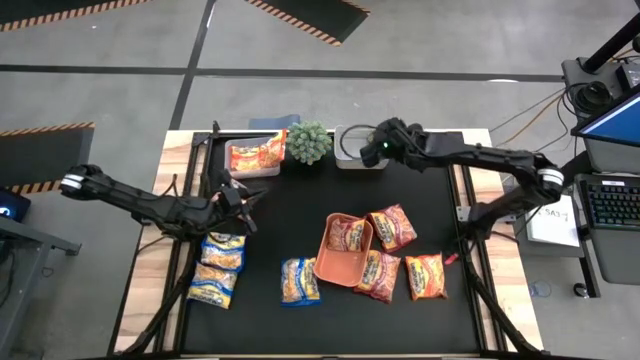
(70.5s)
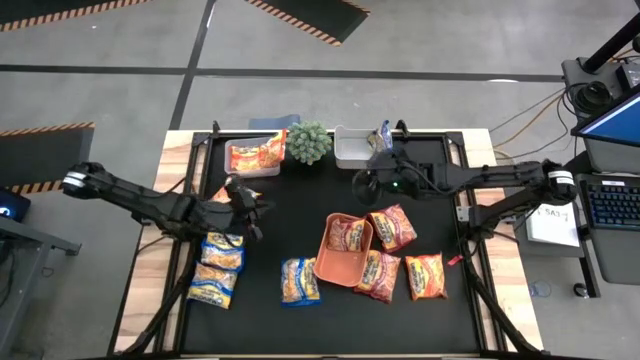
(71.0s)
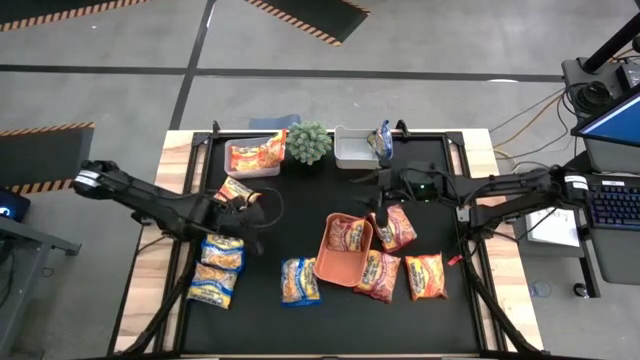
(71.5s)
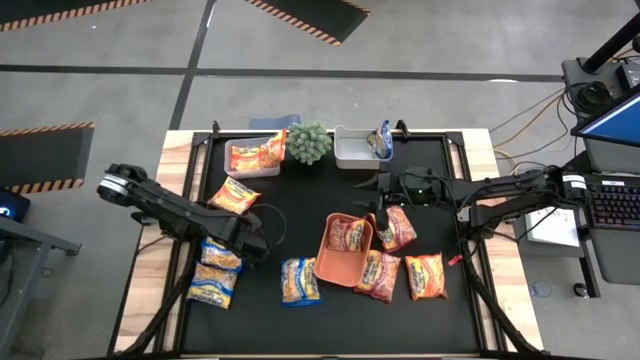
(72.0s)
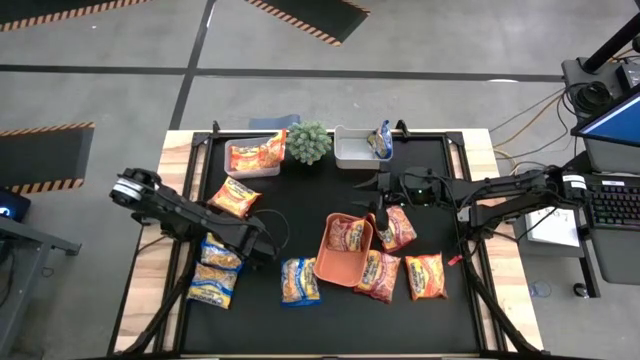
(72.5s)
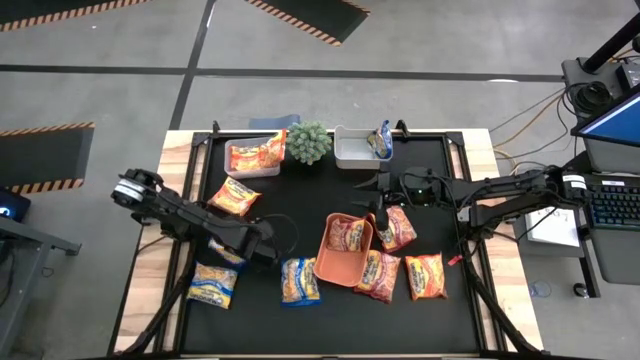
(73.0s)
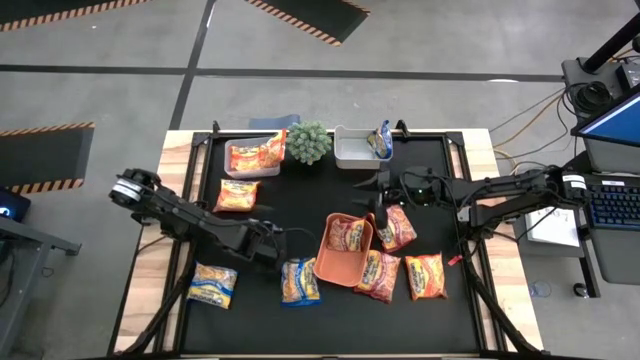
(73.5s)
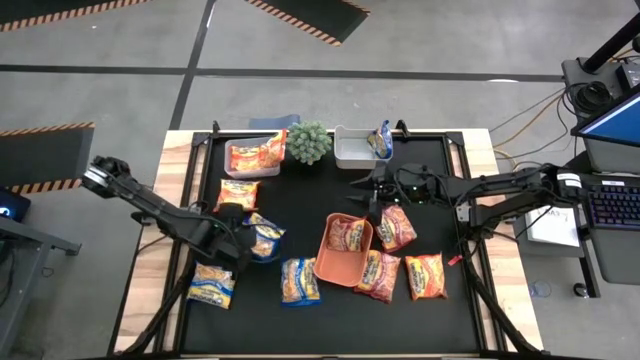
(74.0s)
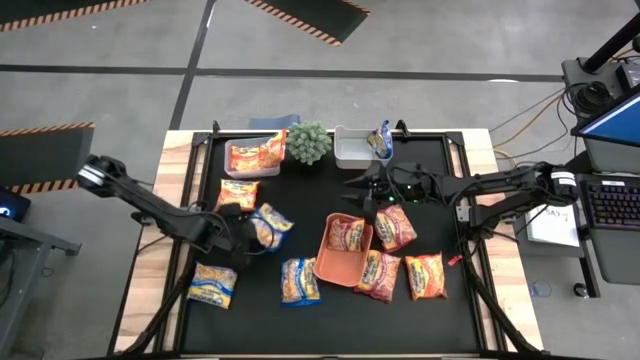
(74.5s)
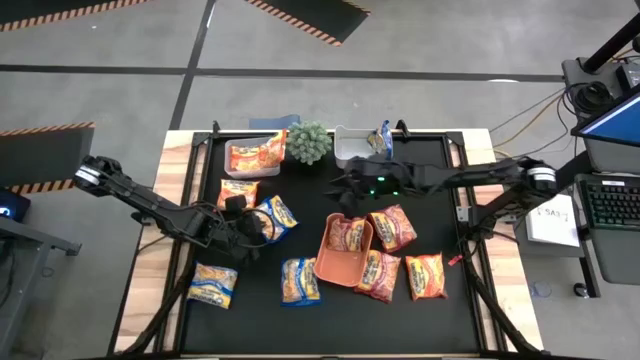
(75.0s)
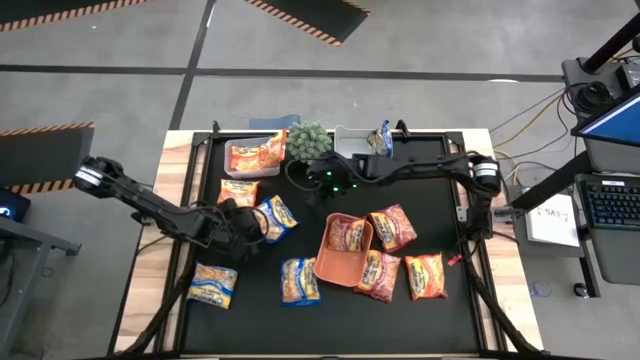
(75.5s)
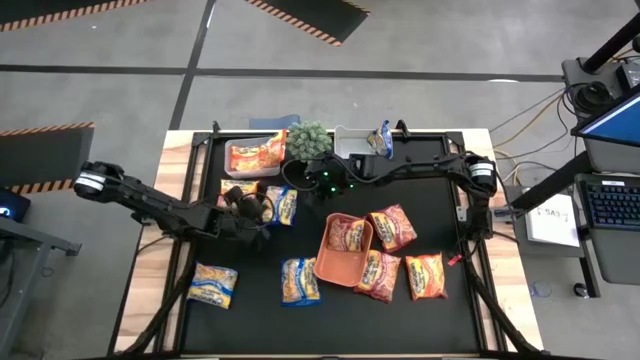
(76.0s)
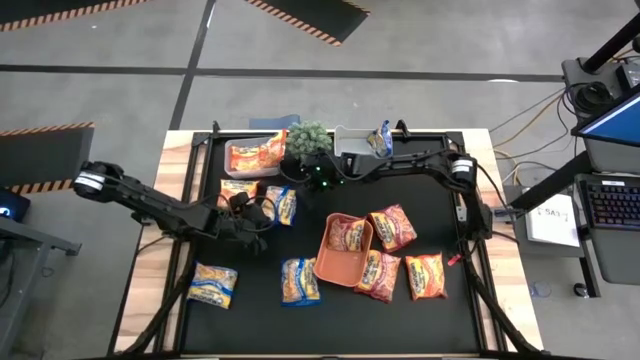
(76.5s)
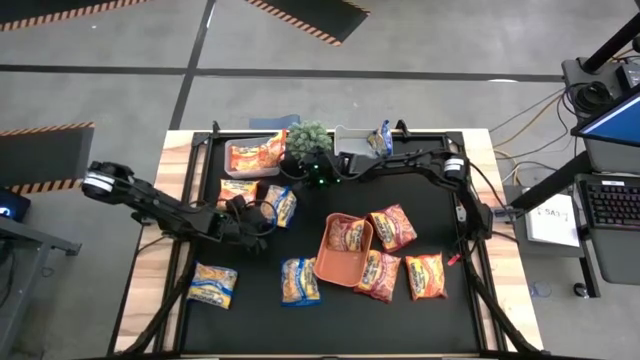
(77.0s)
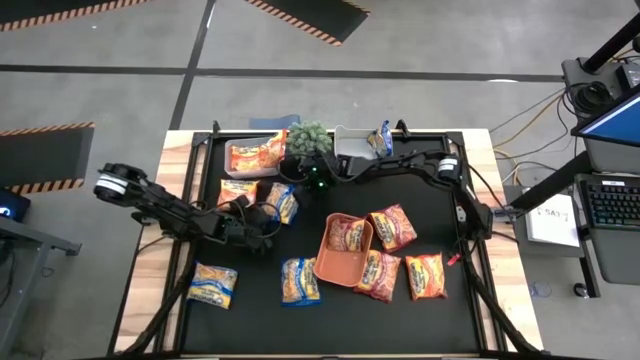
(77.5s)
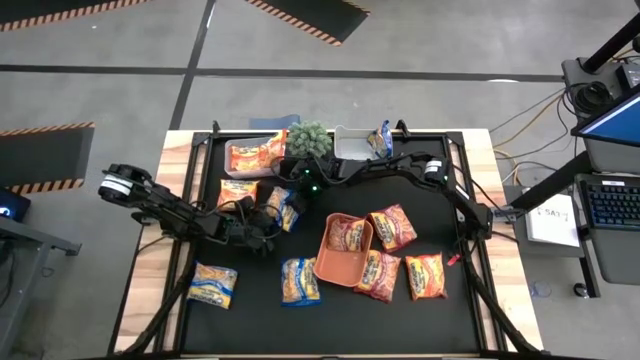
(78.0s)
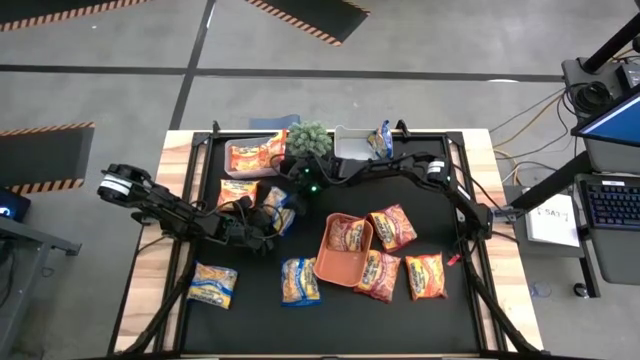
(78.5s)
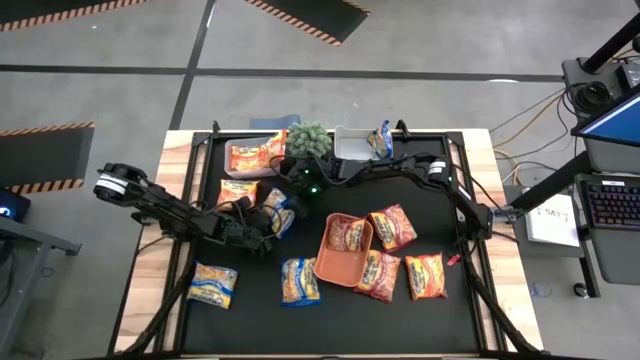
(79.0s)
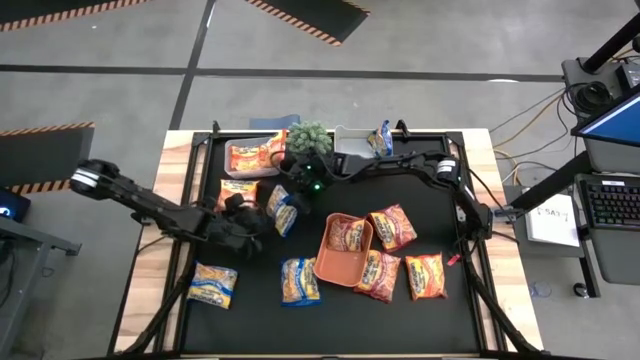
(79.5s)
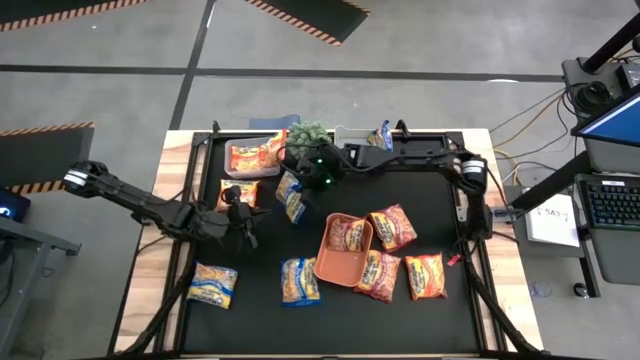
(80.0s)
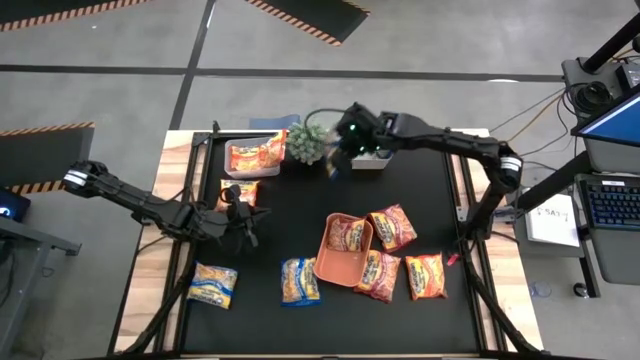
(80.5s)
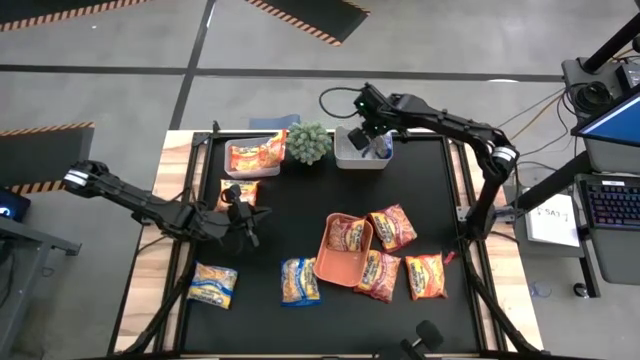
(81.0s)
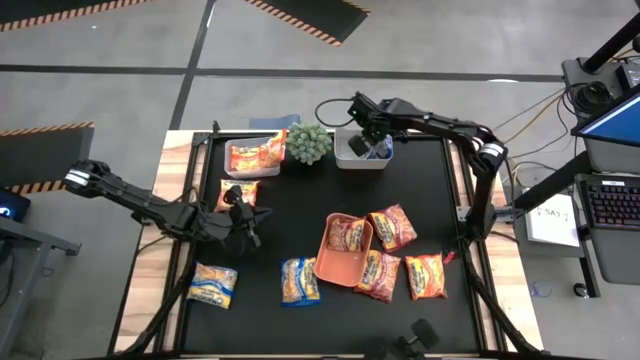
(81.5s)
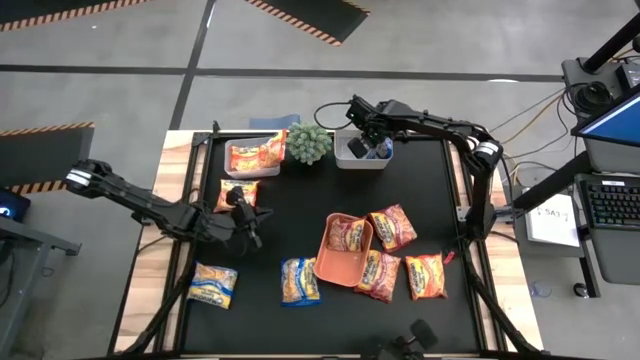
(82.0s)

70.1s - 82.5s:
Task: Sort Maruchan noodles
Put the blue noodle pack into the gray bin

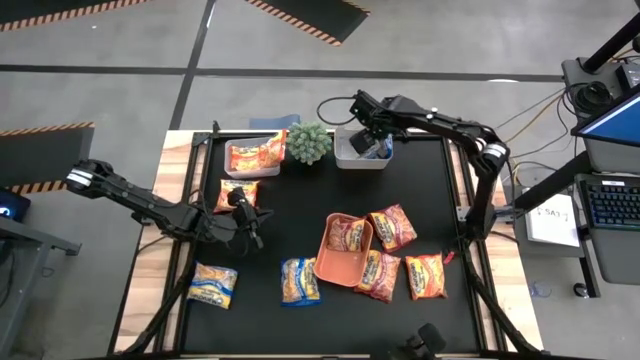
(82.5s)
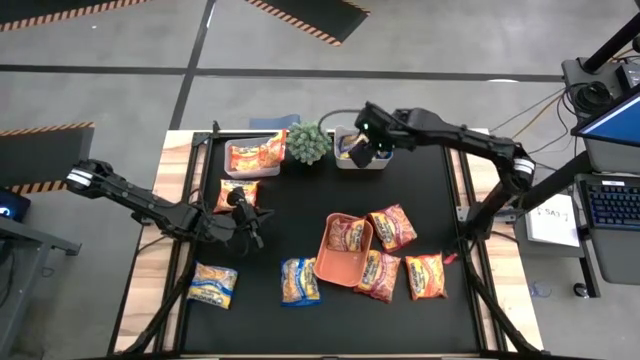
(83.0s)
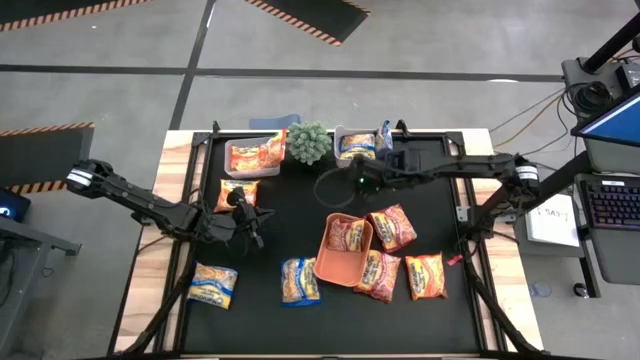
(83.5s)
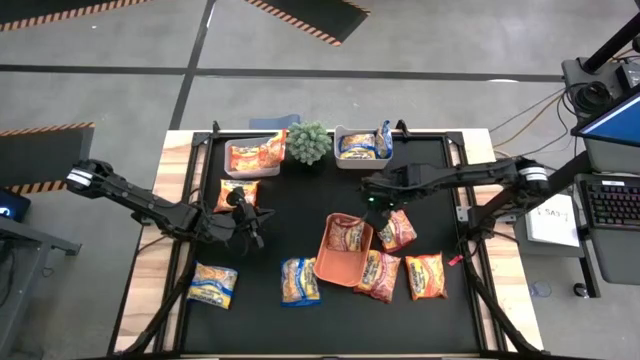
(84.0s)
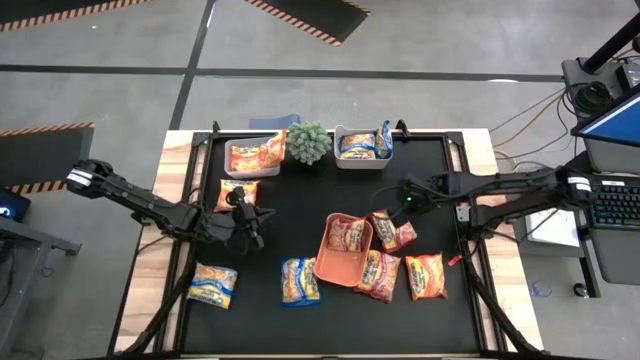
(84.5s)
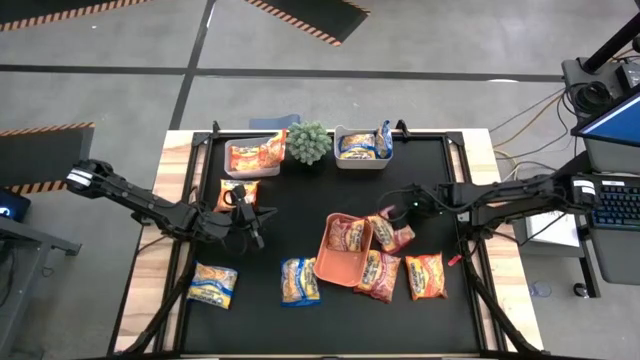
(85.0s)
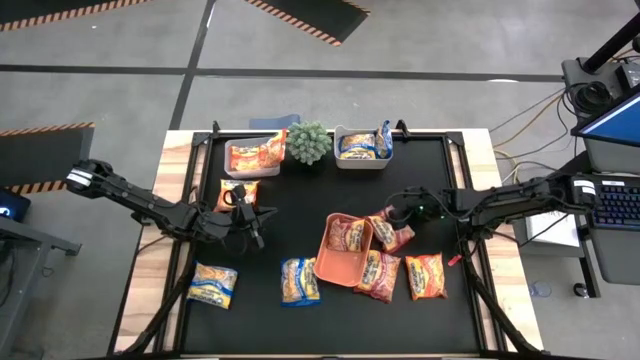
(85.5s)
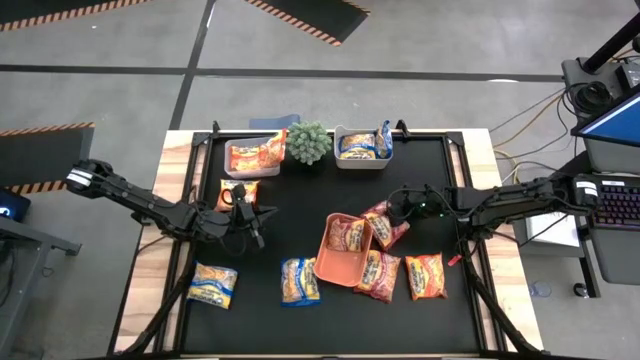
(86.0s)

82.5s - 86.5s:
Put the red noodle pack into the orange bin

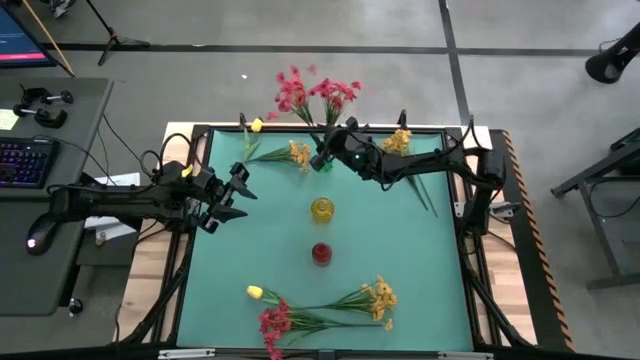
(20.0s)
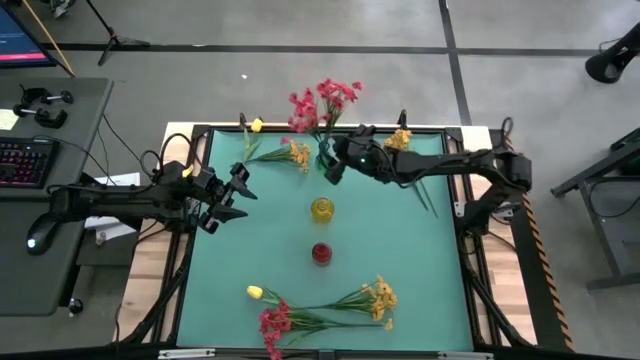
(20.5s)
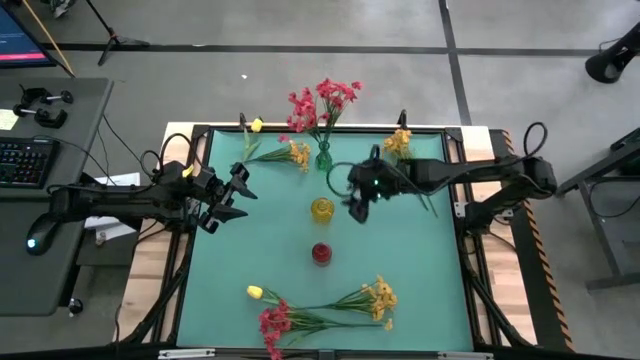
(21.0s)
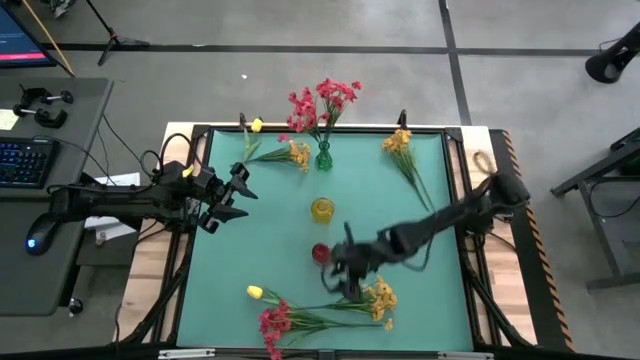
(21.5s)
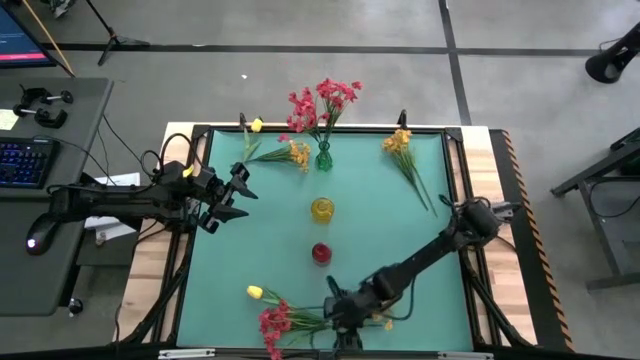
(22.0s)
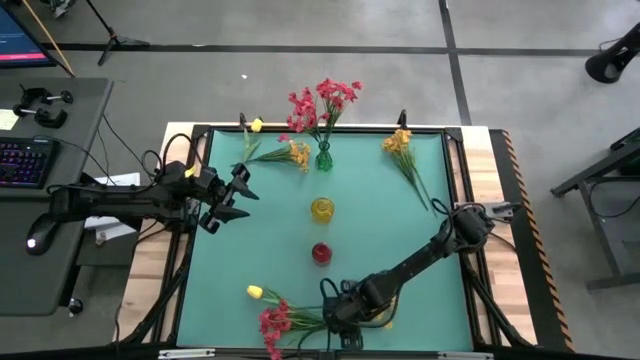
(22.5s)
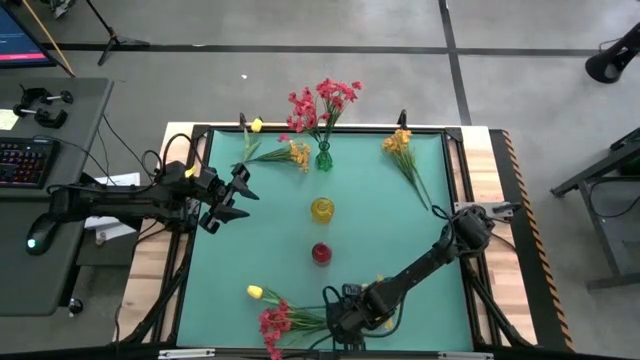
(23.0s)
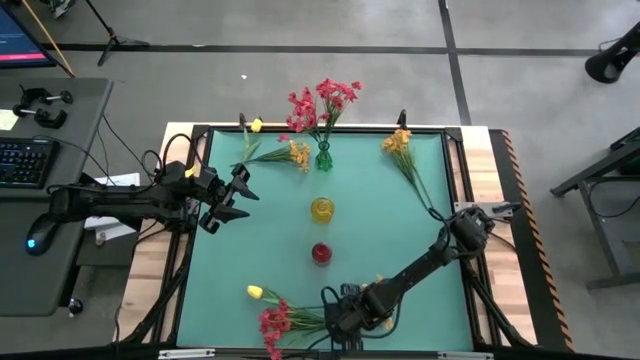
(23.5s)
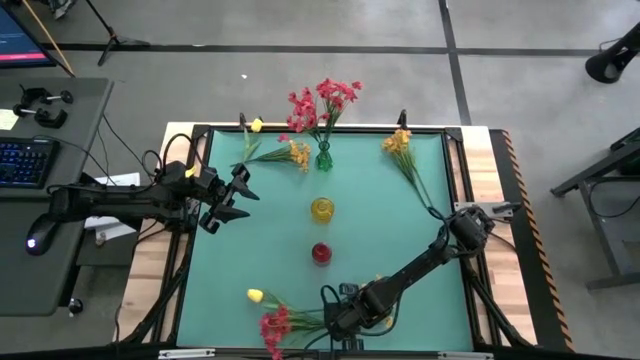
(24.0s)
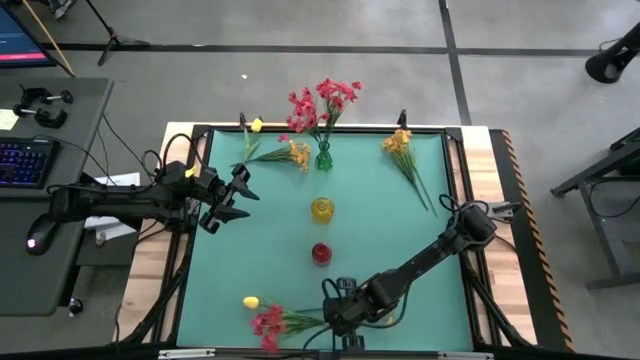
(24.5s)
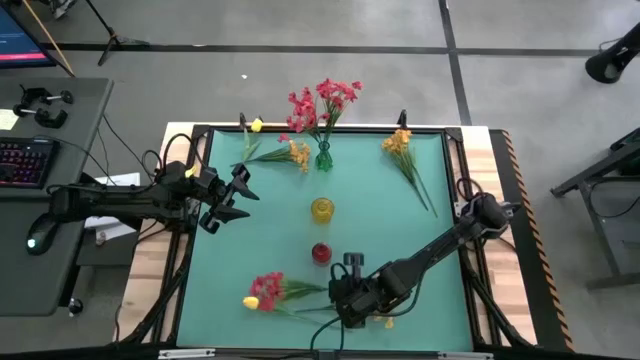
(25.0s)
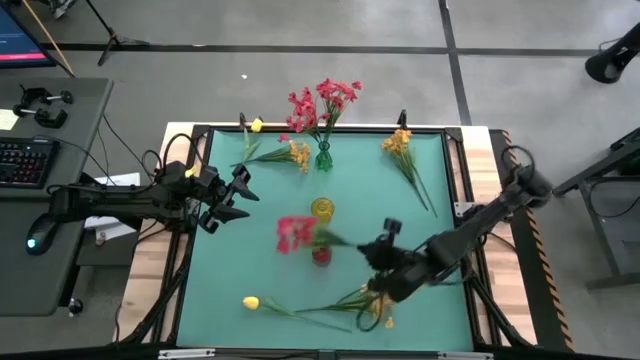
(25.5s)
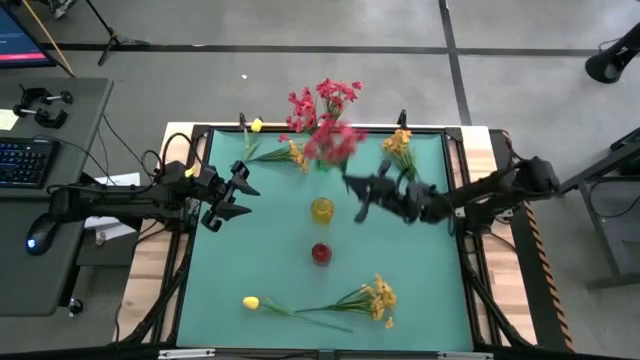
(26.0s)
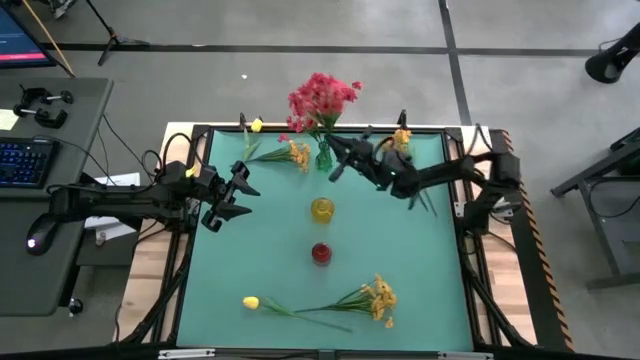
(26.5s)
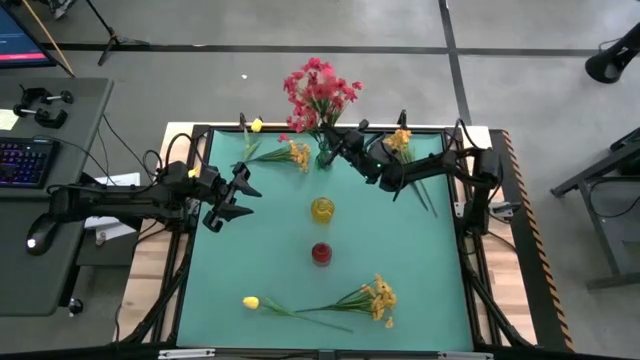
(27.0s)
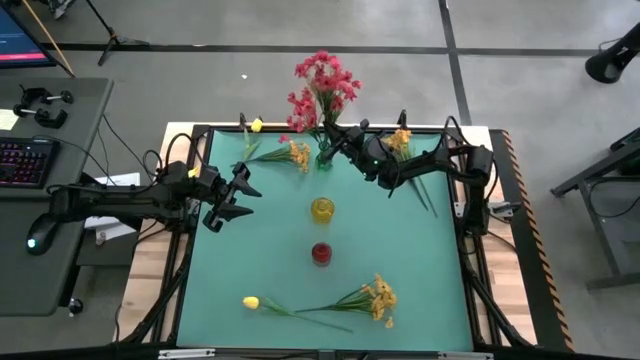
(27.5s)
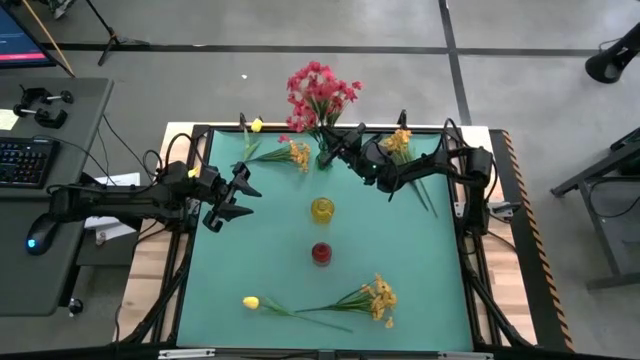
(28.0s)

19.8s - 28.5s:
Task: Sort flowers into vase by color
Put the pink flowers into the green vase
